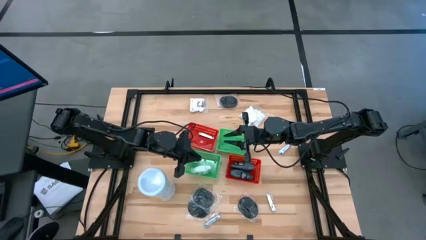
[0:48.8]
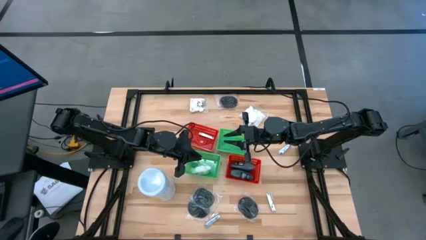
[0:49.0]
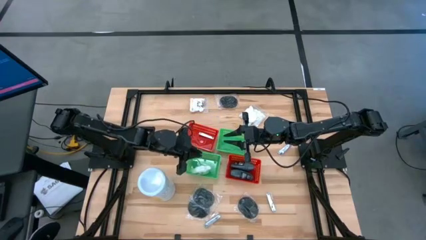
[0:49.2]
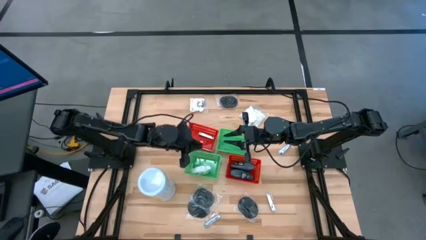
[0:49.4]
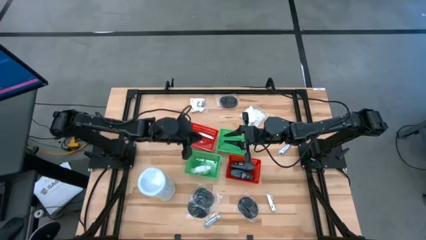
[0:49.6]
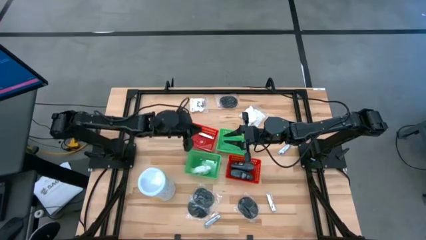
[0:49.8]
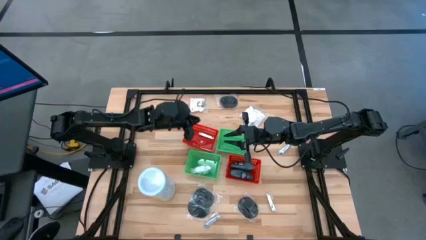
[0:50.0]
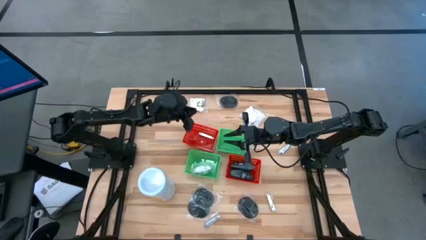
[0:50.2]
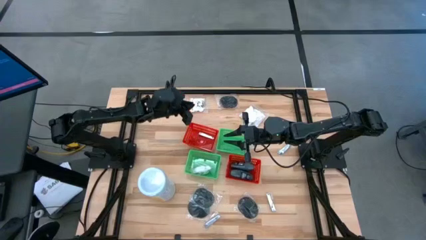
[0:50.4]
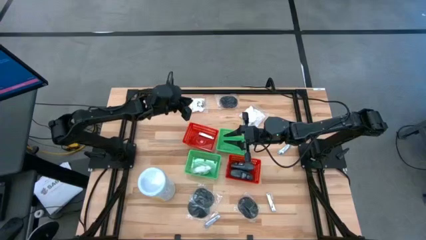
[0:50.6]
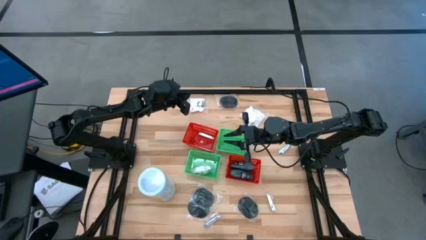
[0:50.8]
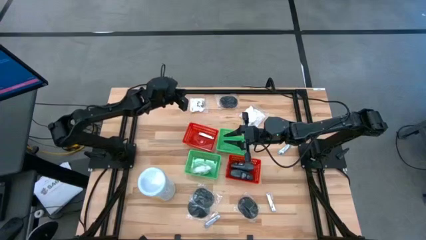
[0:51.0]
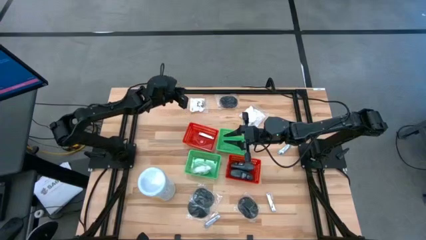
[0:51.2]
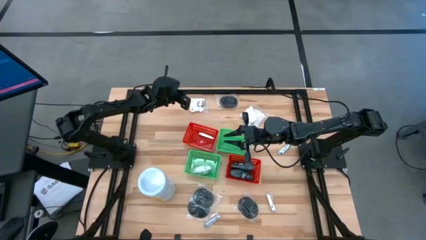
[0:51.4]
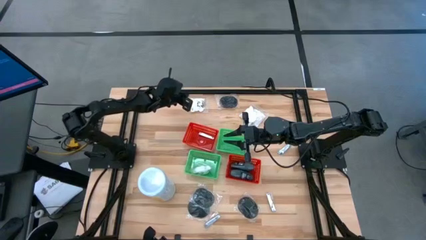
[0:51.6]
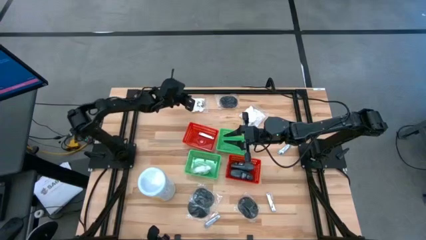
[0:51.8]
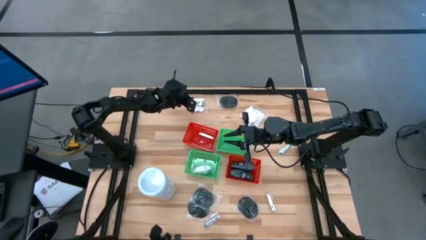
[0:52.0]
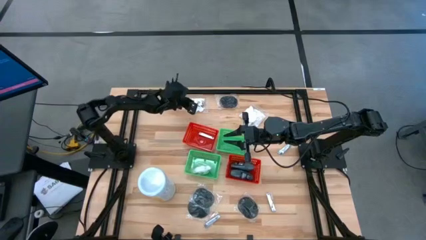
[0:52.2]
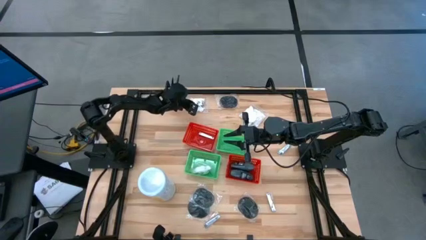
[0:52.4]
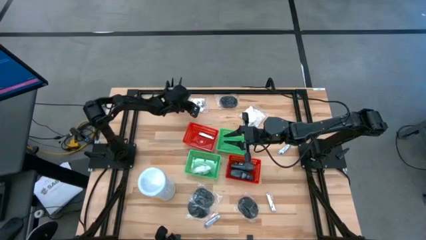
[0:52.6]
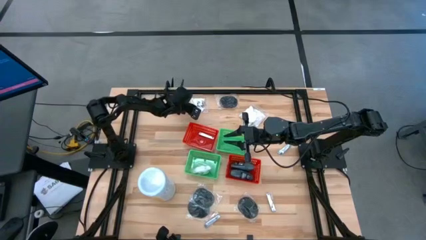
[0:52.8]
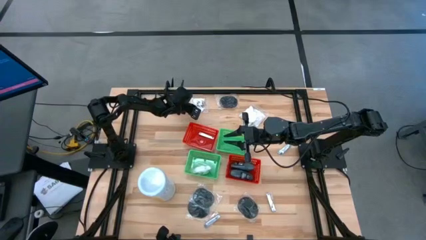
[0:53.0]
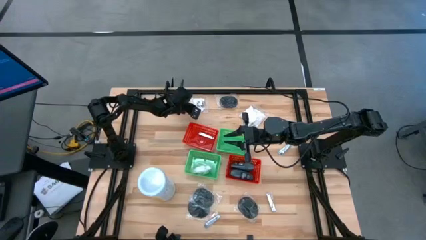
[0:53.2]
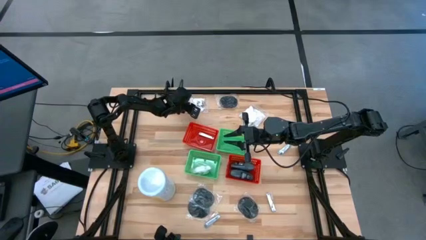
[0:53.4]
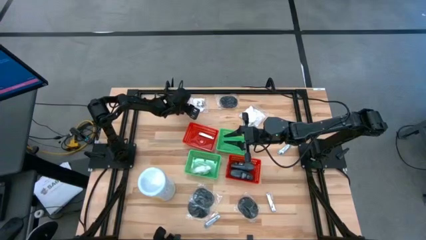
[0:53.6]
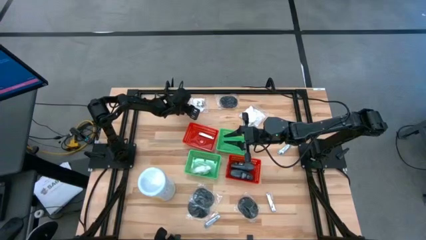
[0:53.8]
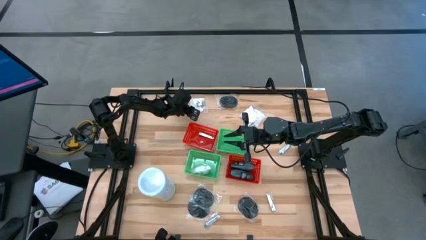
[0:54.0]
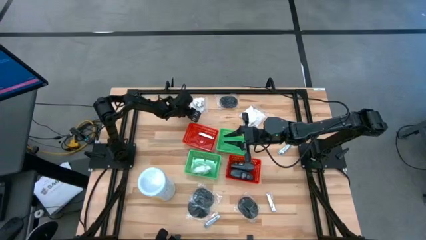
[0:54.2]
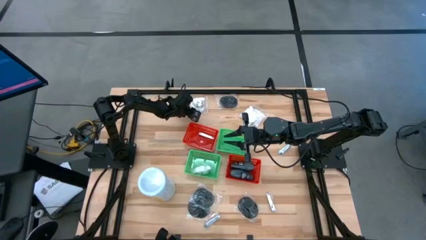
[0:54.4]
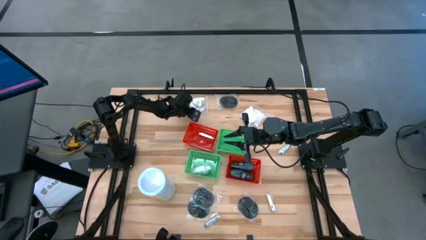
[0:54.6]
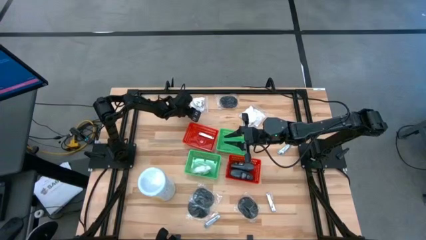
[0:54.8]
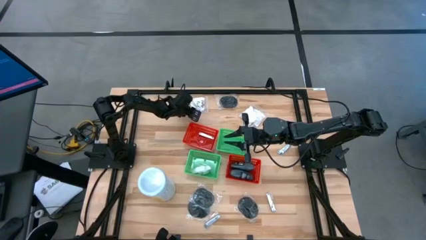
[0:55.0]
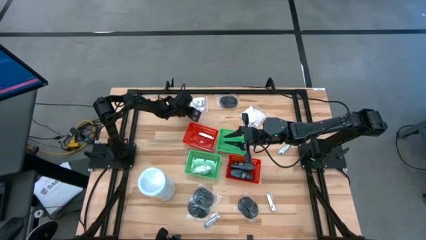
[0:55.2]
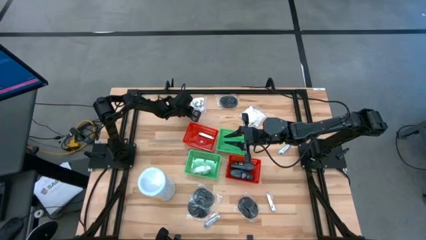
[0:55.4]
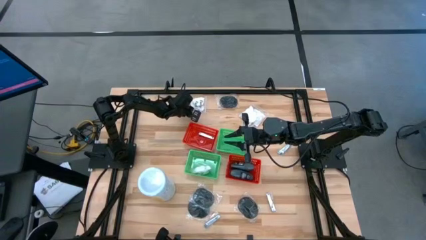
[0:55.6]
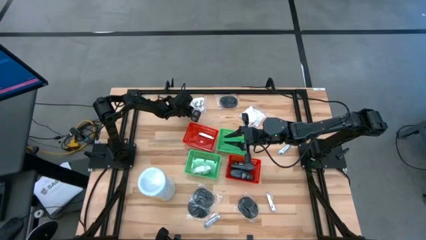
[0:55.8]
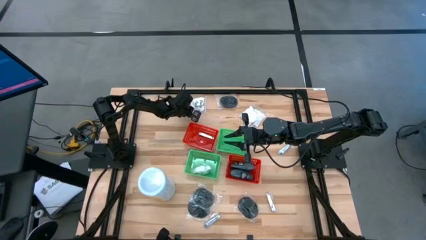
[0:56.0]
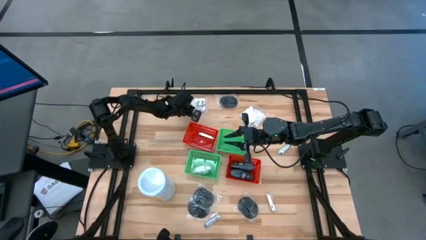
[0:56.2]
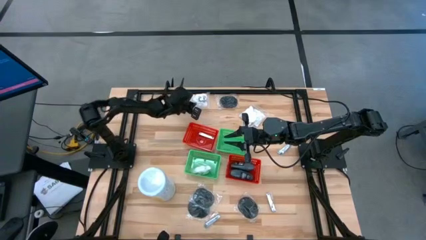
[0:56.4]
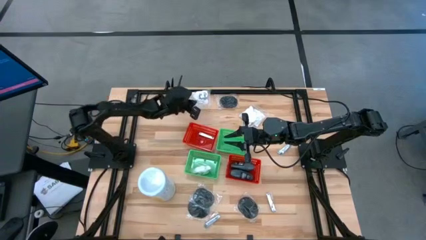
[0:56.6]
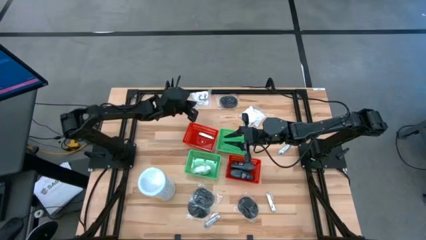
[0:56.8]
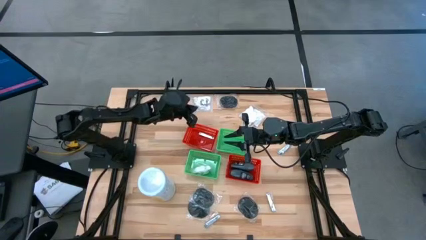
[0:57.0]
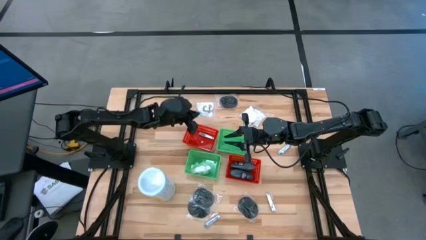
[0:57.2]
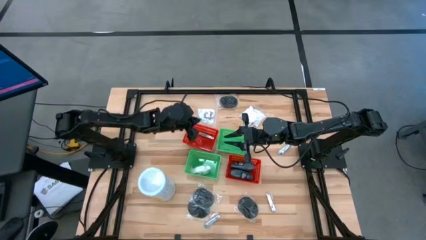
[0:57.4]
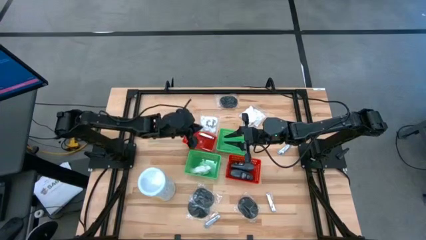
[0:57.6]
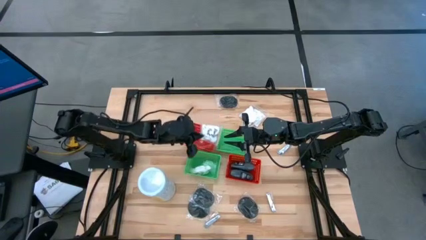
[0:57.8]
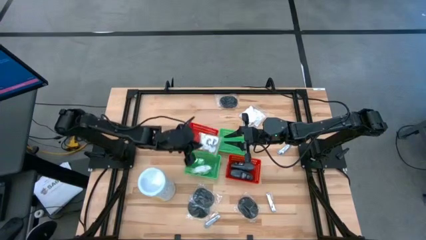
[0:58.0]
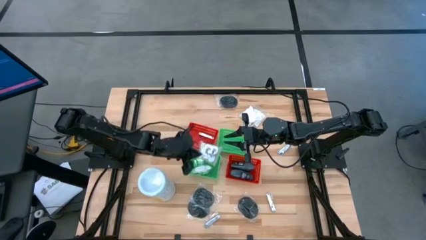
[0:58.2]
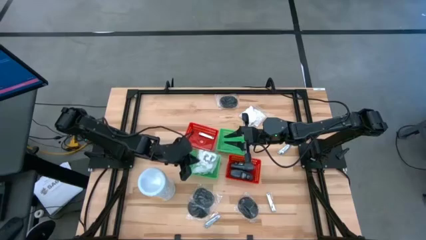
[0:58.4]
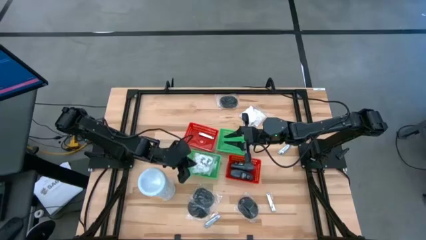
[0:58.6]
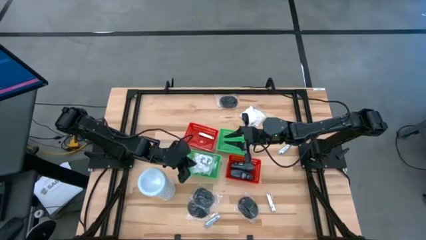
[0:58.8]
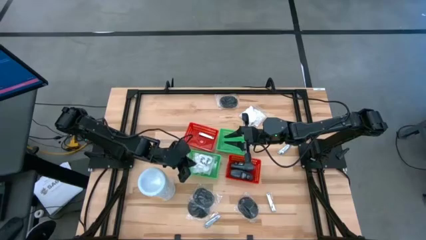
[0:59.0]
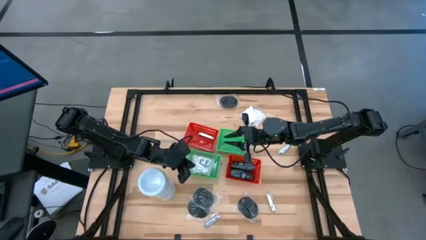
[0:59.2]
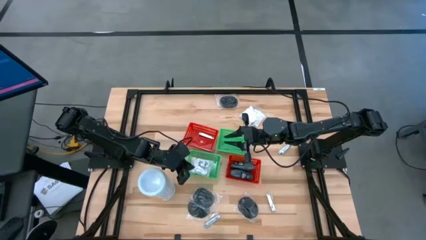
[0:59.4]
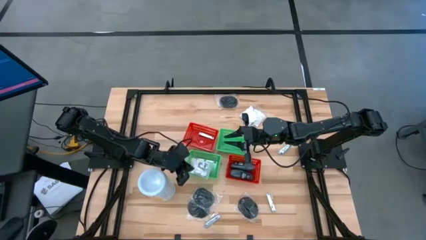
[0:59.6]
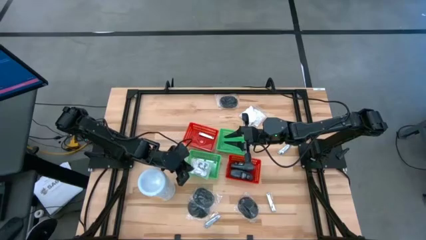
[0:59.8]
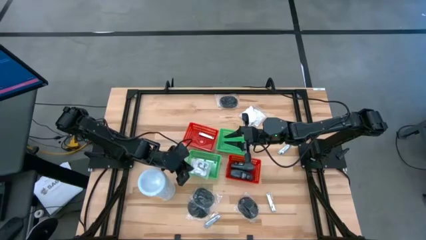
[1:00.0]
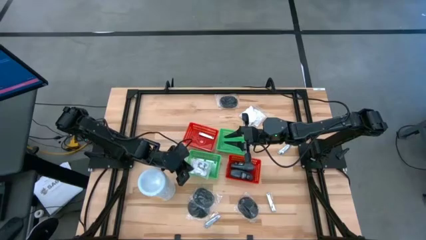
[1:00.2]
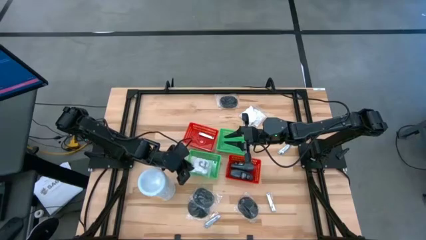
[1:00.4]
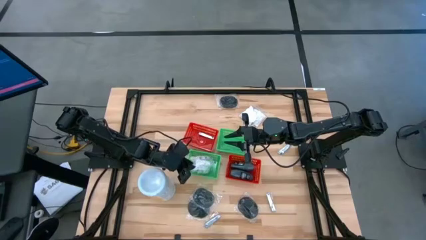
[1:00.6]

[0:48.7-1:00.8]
Task: Pick & Place Travel size toiletries
Put the white cotton pack into the bottom left green bin

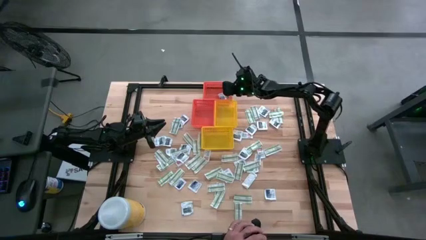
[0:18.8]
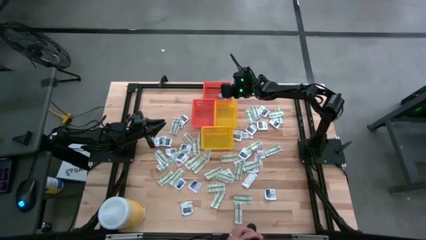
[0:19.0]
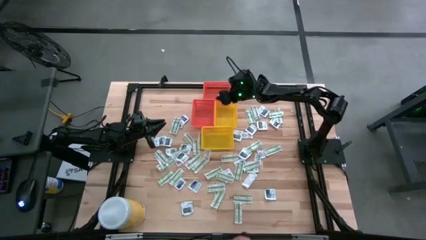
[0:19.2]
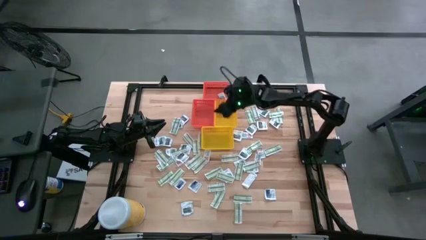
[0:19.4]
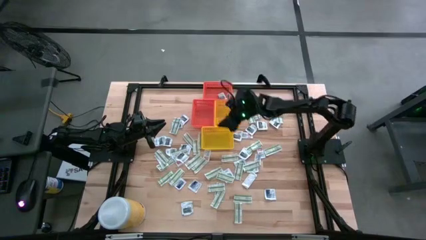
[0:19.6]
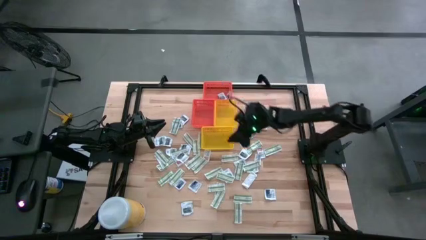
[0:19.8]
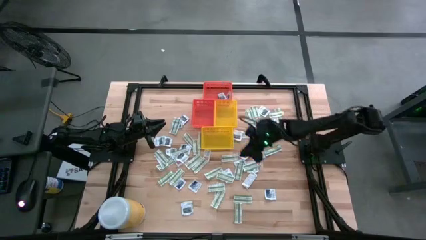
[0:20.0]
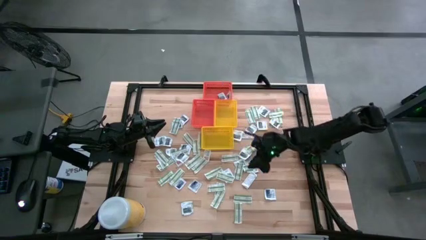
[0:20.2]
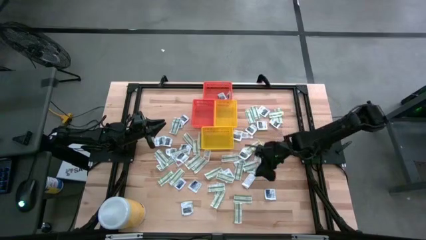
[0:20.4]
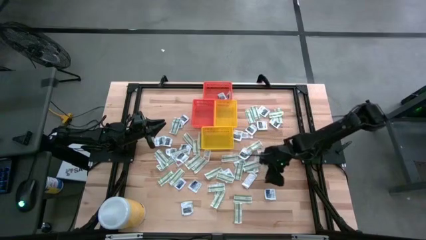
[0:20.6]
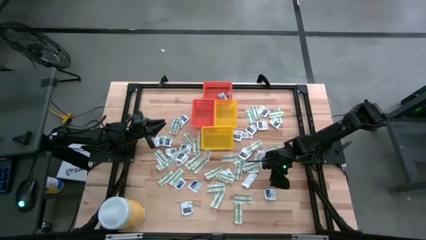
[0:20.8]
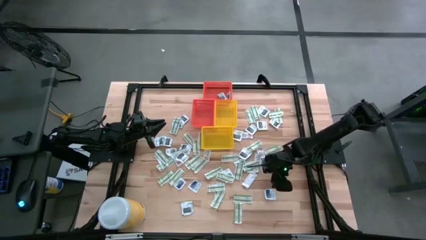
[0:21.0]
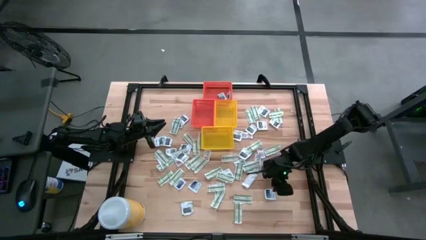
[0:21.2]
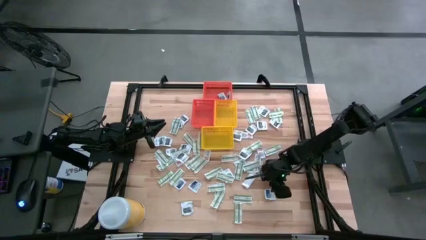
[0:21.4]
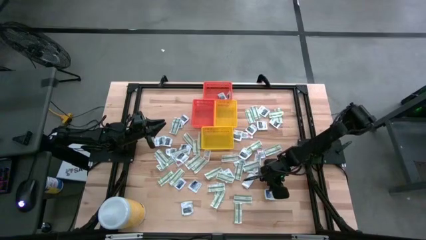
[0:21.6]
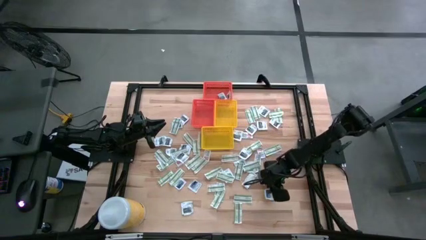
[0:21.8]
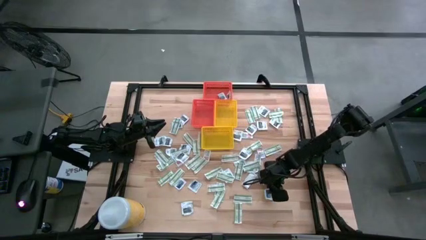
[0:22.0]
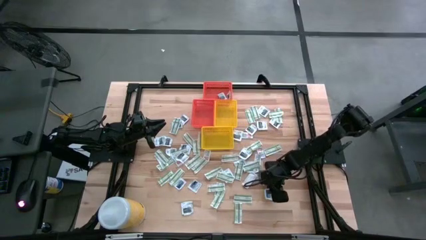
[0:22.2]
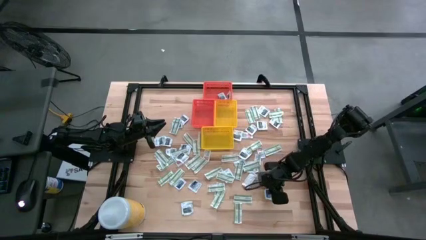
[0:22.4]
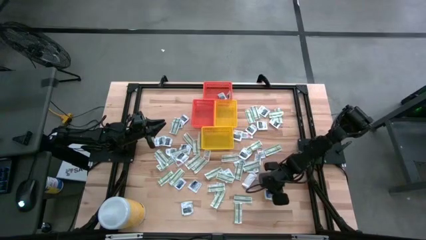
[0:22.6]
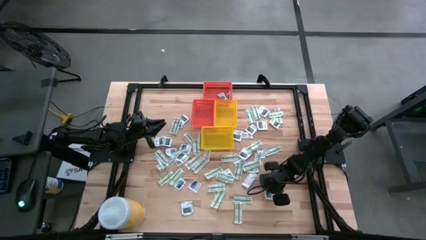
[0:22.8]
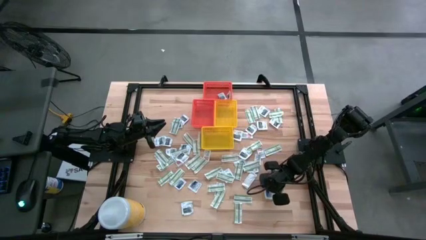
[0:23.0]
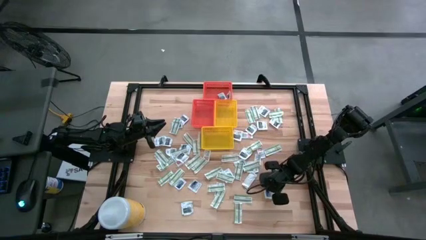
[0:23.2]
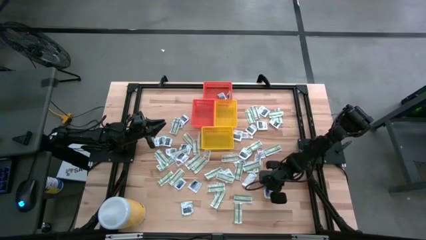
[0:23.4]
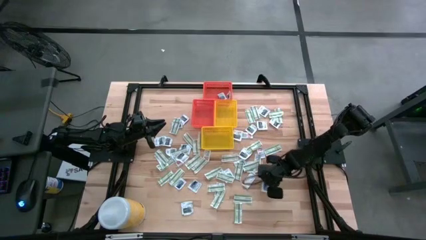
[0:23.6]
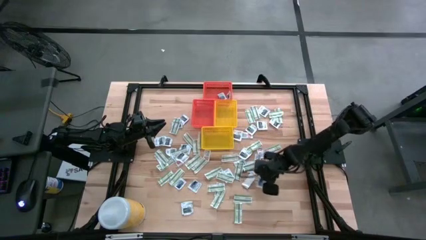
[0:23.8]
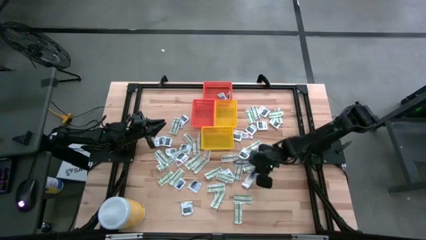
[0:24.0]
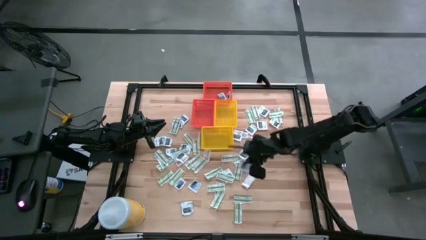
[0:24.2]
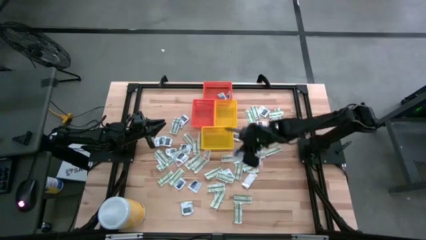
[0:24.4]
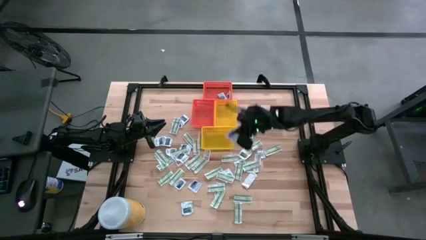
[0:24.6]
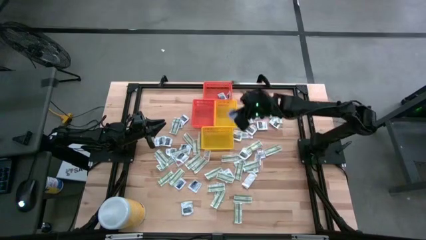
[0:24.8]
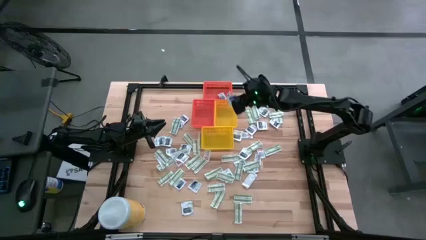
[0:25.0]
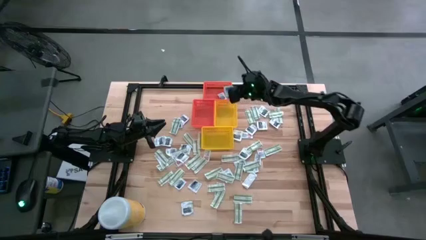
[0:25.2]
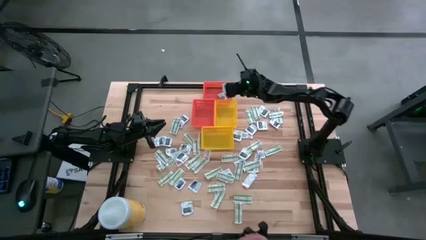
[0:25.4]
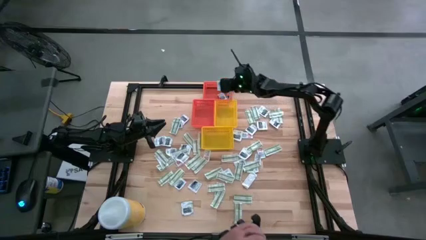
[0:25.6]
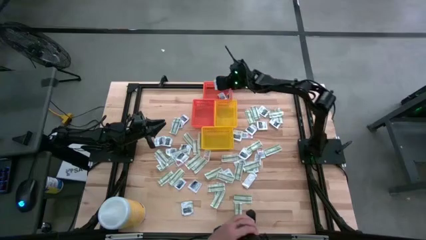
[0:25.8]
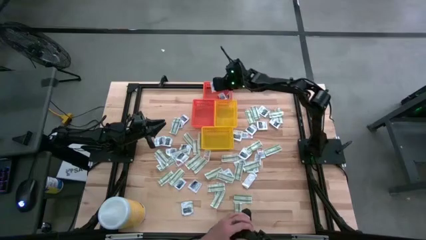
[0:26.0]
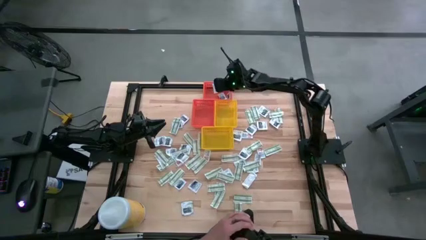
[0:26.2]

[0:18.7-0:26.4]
Task: Pick & Place First Aid Supplies
Put the alcohol pad into the top orange bin
